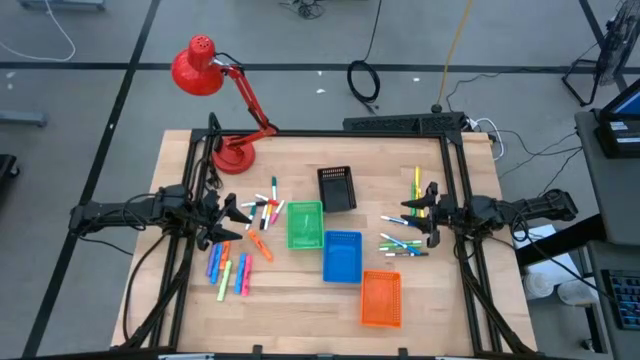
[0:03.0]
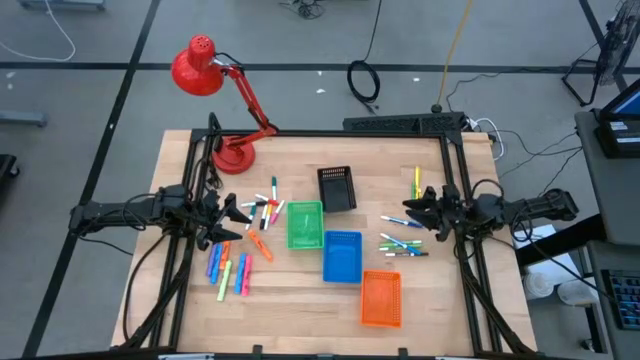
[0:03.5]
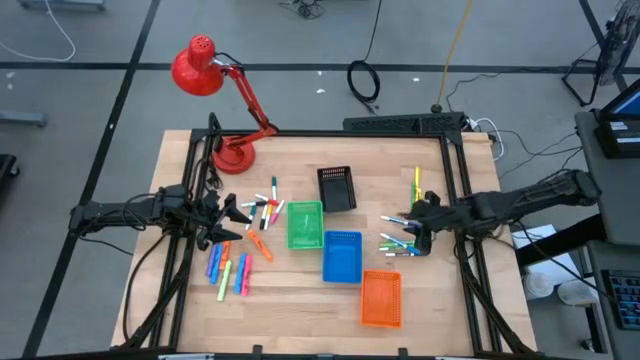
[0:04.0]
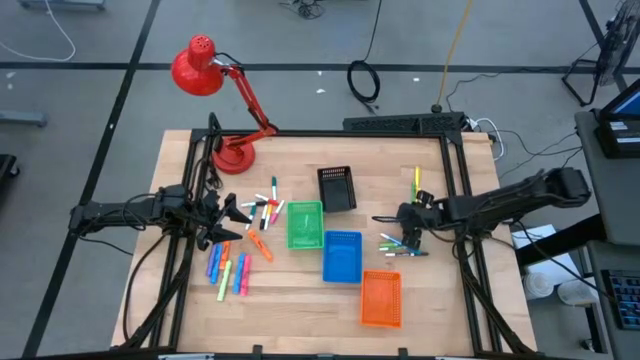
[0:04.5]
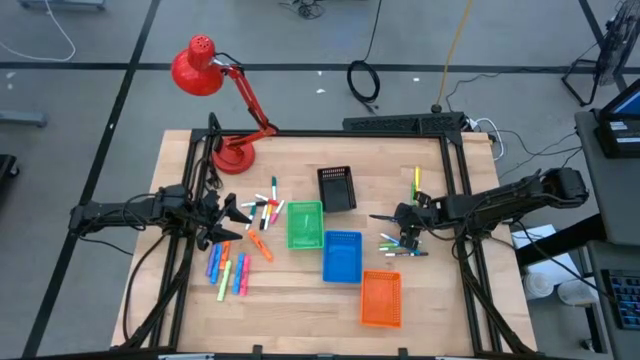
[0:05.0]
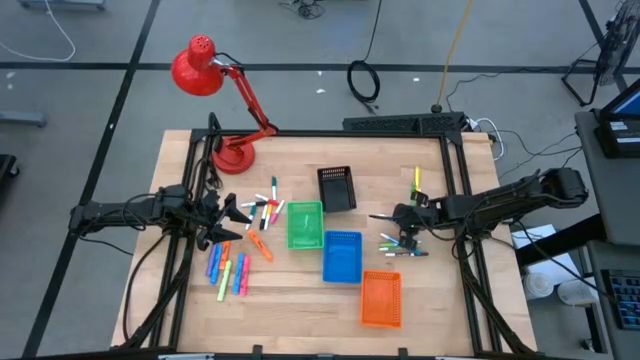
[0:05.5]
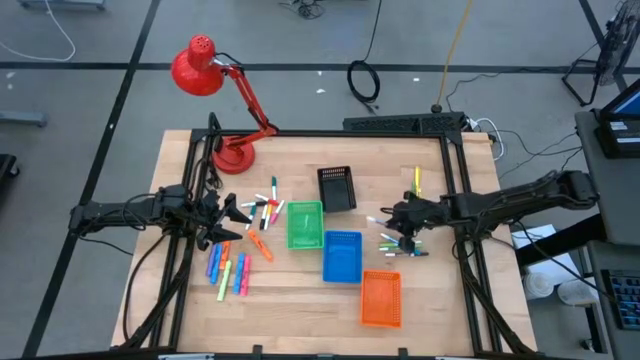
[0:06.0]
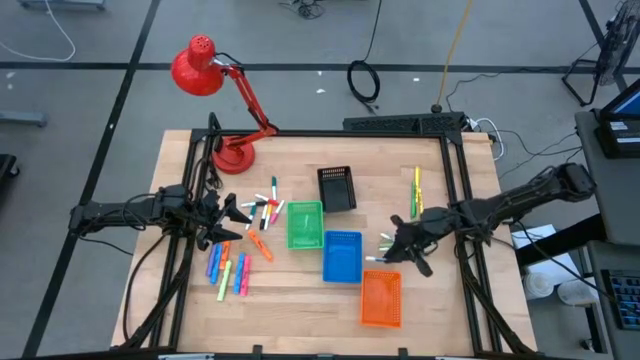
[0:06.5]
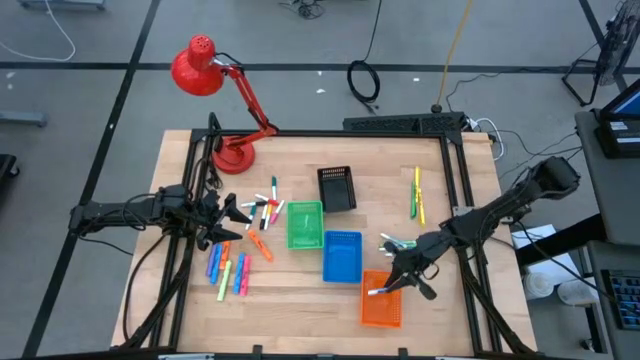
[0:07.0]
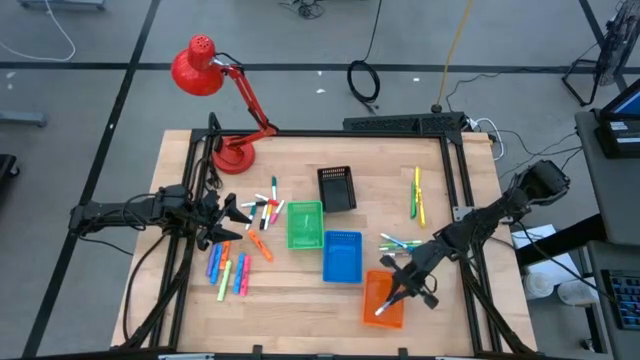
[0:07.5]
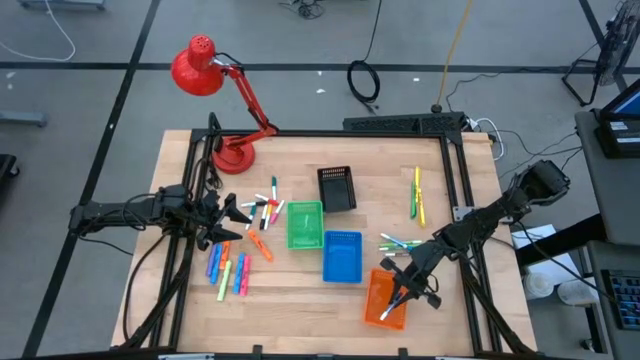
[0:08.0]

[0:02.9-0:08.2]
Task: Pick & Place Markers
Put the dark blue marker pen into the orange basket

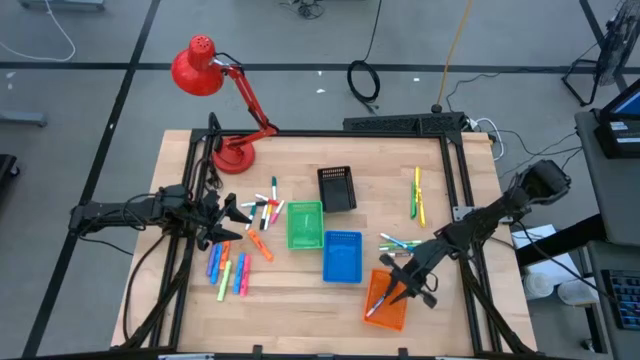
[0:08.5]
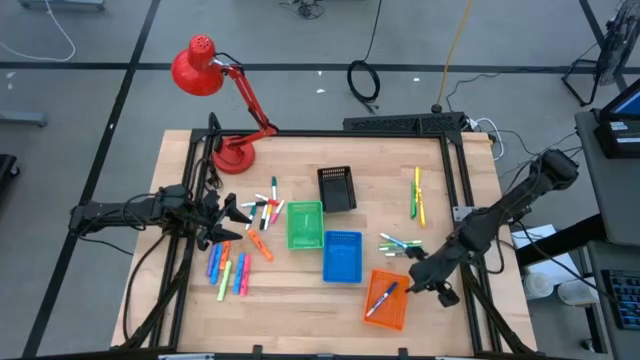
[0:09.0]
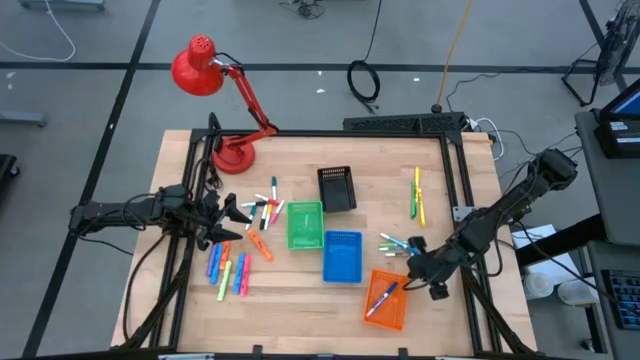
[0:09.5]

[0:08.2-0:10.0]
Adjust the orange basket on the table

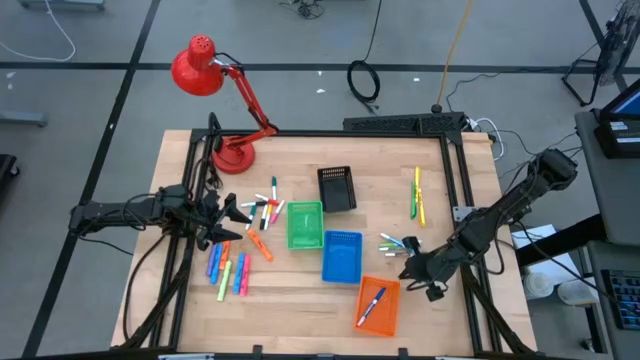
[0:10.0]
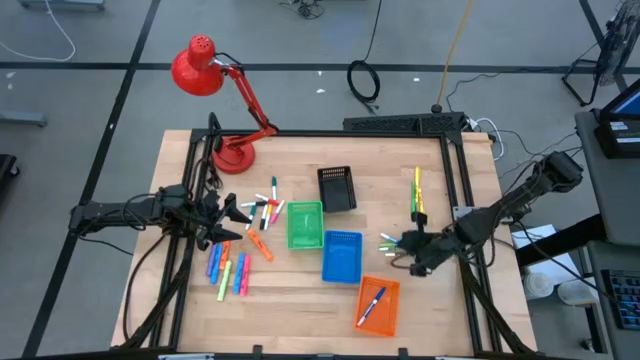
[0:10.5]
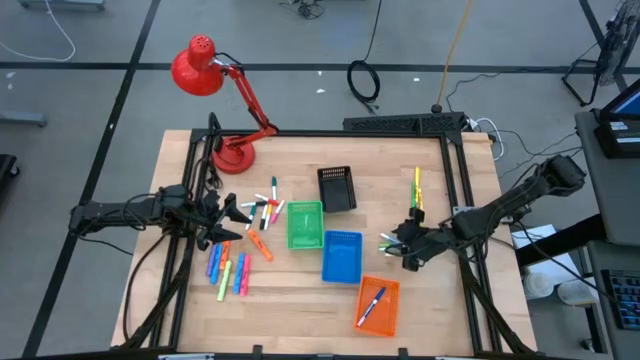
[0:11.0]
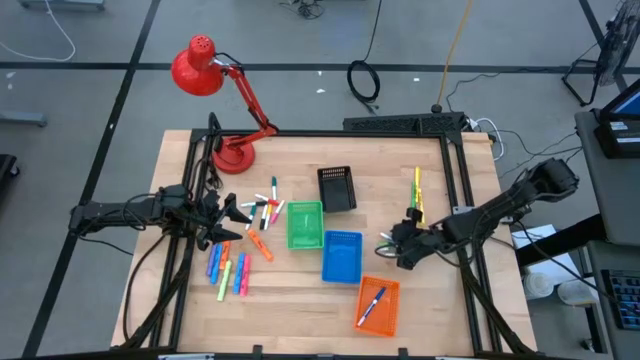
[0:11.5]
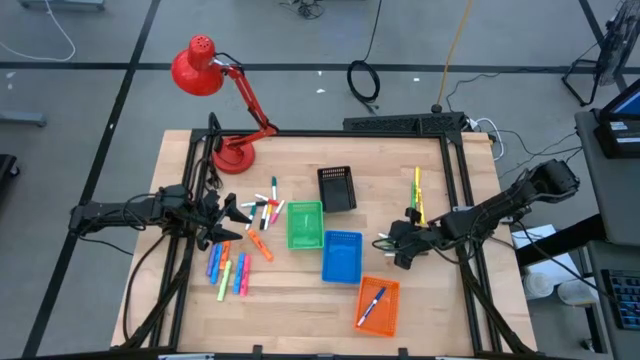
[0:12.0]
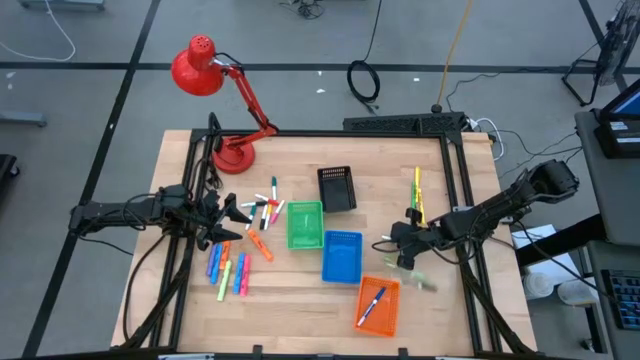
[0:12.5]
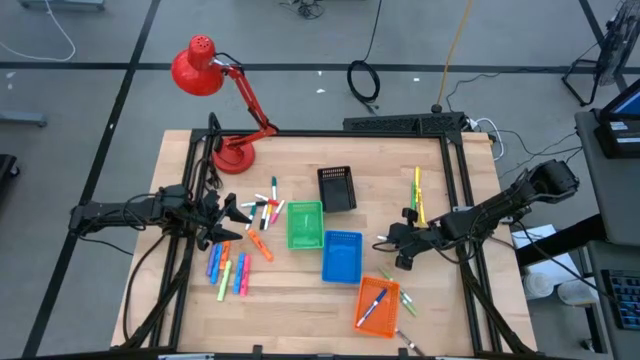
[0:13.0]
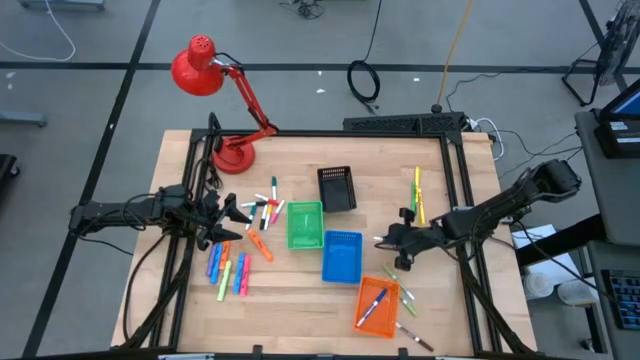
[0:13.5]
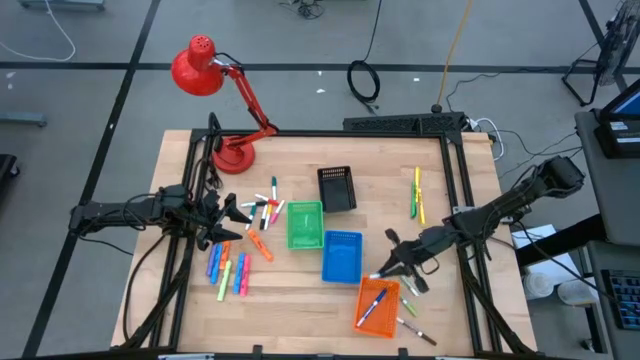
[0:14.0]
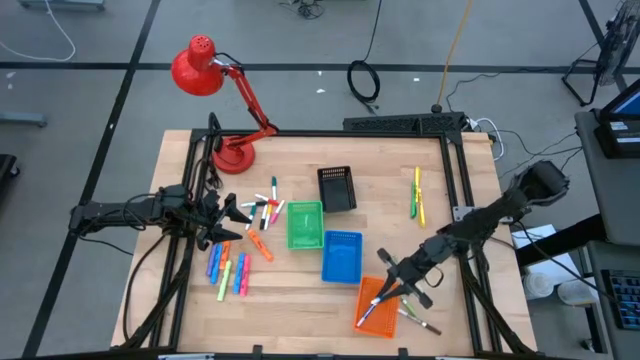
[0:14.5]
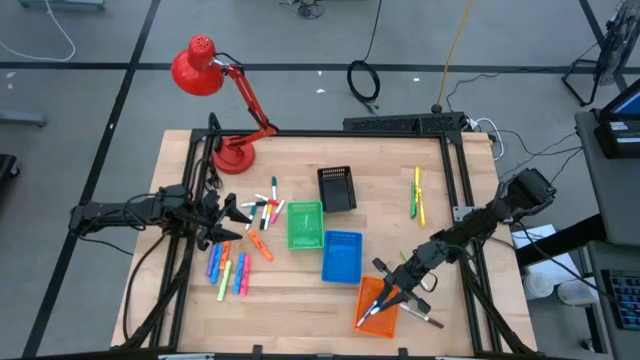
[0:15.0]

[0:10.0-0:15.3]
Put the blue marker pen into the orange basket

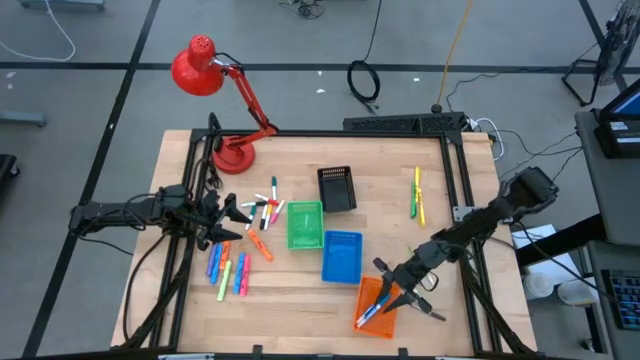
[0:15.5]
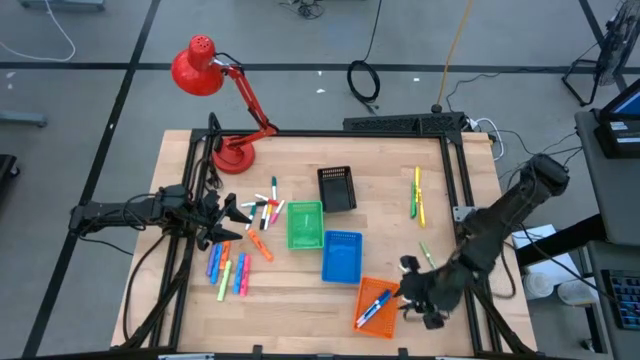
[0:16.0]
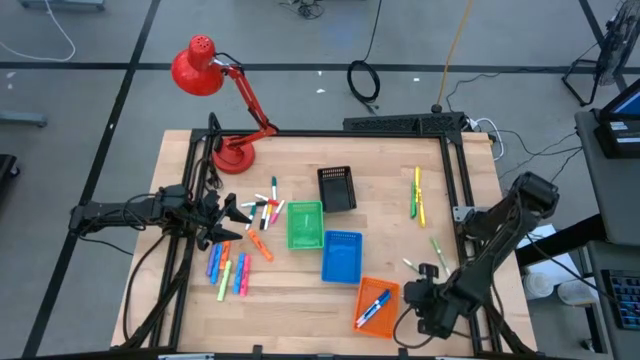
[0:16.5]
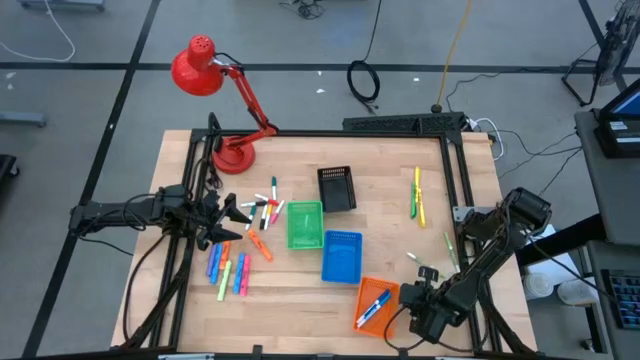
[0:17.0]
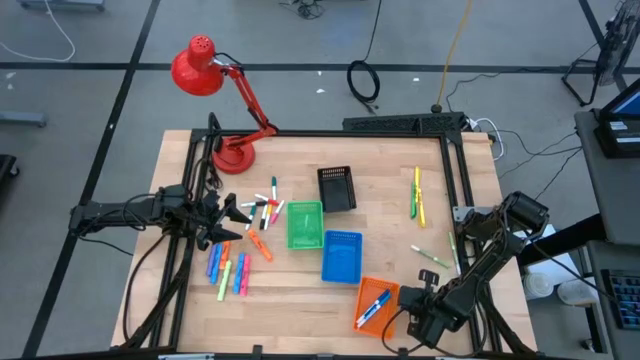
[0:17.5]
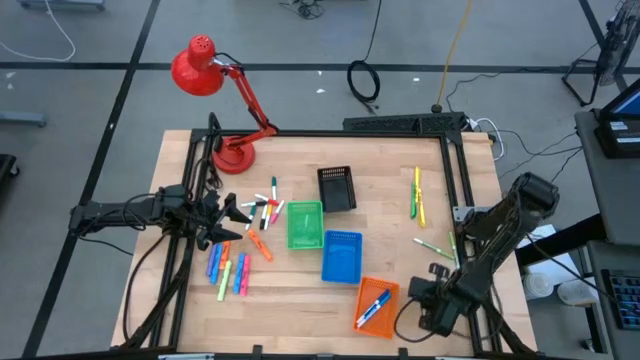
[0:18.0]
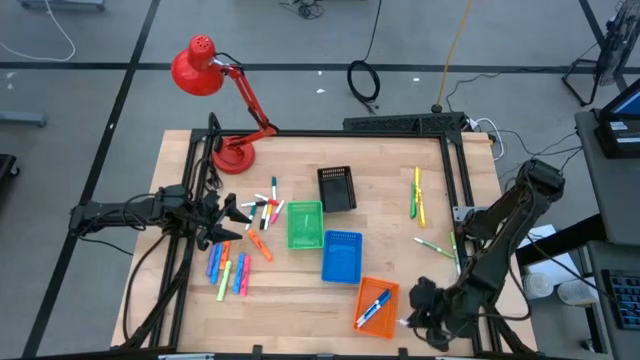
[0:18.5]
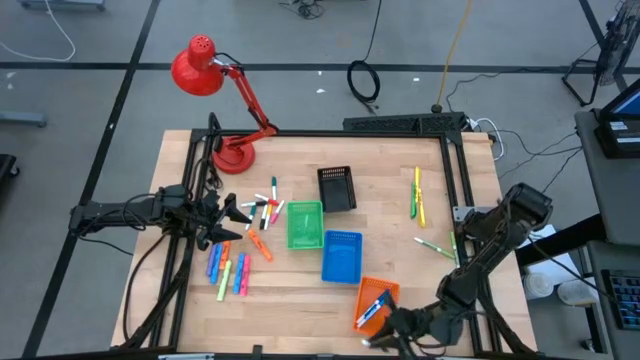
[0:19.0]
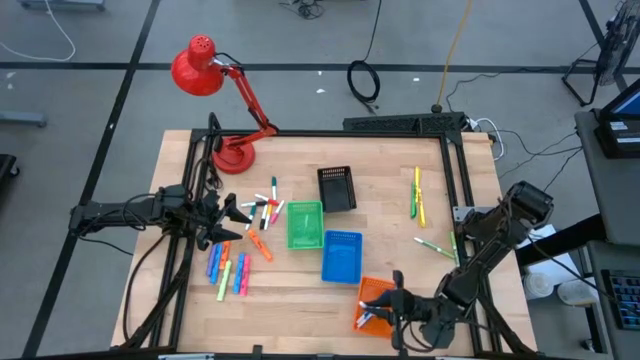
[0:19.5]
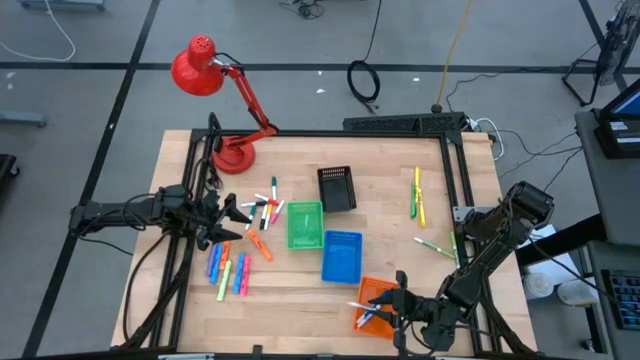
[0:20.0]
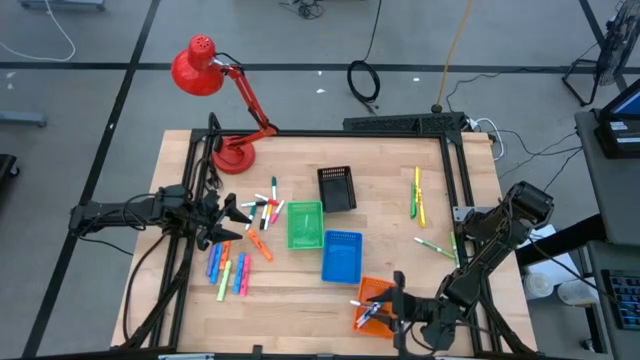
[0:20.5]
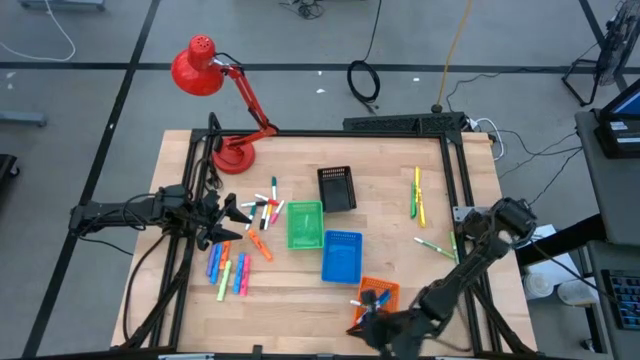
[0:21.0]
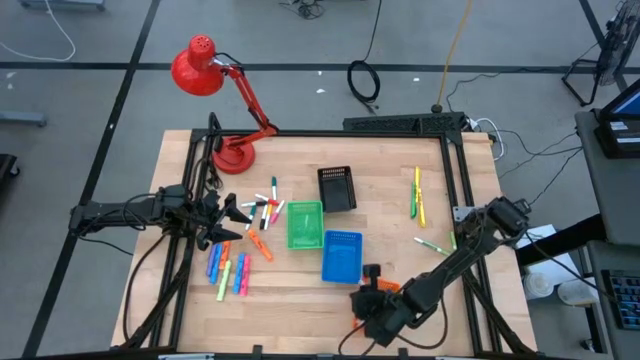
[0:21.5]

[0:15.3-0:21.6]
Put the brown marker pen into the orange basket

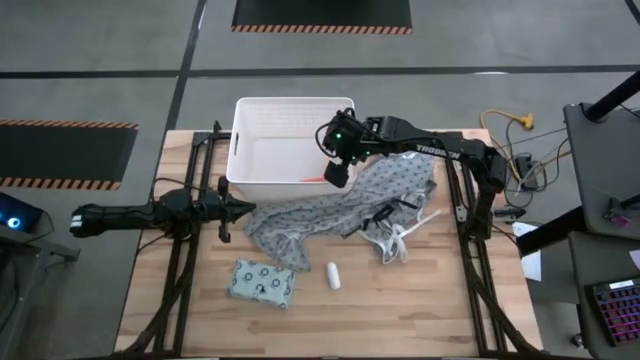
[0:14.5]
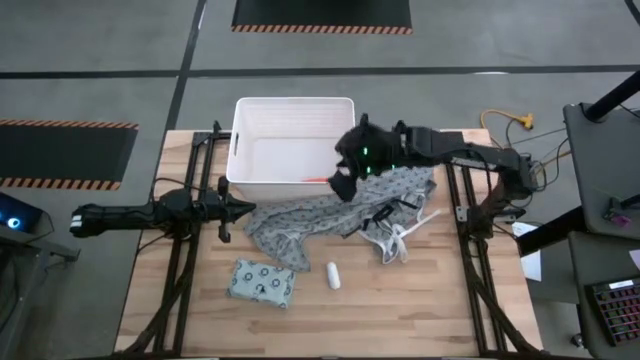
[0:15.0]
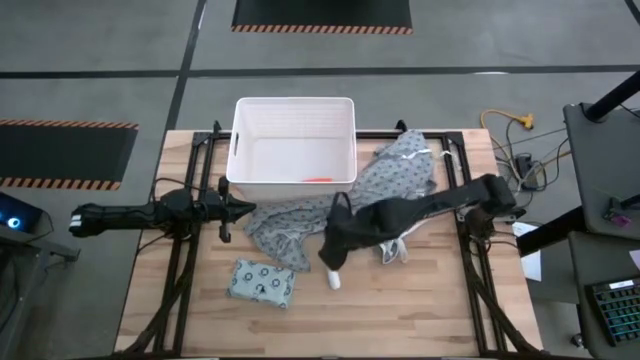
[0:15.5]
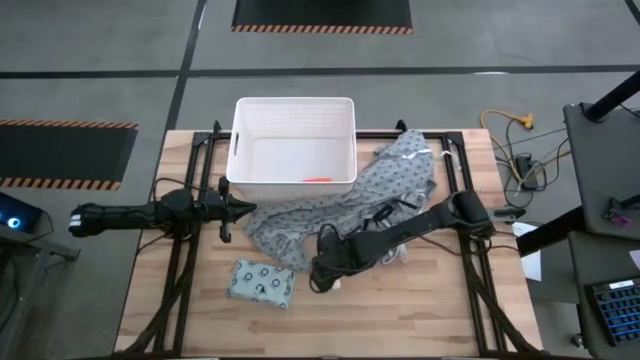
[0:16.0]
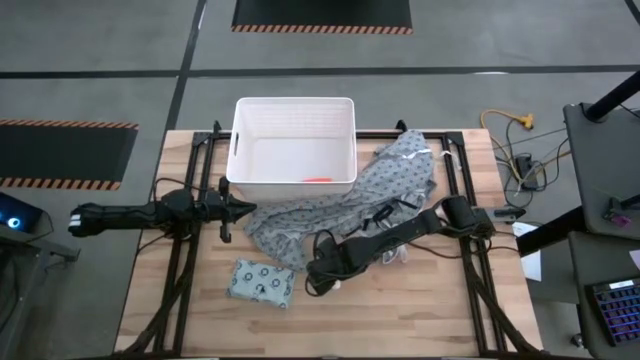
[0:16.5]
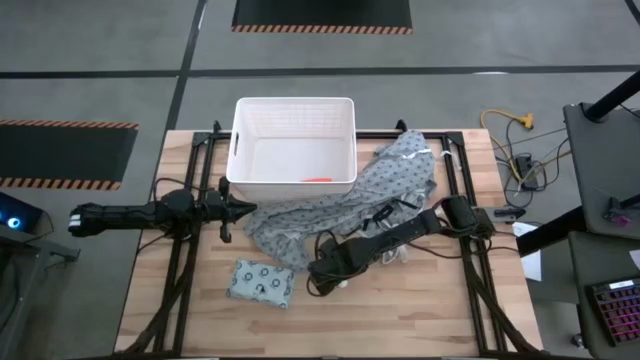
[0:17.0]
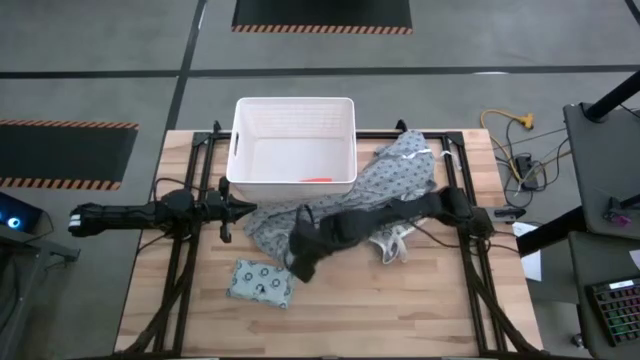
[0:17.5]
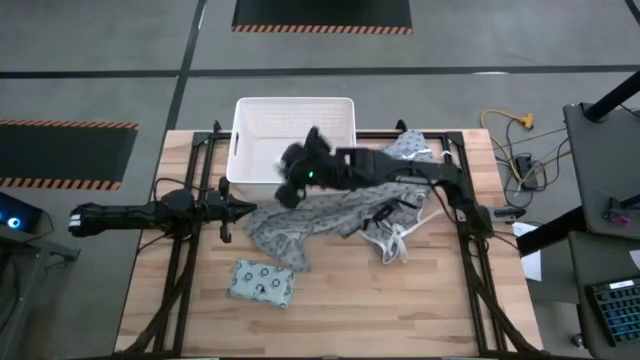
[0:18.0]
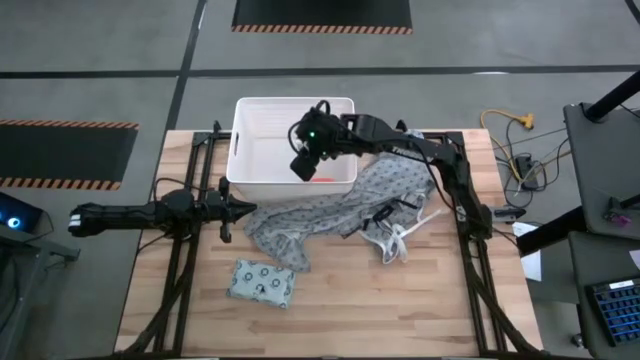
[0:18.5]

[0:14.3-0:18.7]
Task: Pick & place medical supplies in basket/bin
Put the white bandage into the white bin
